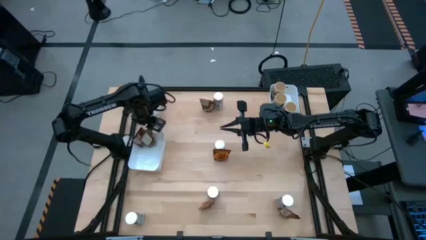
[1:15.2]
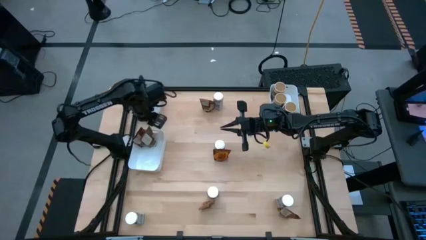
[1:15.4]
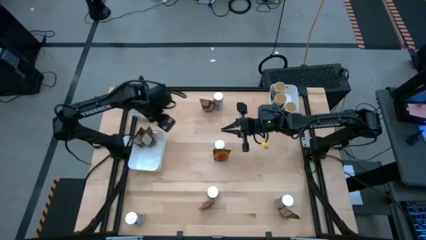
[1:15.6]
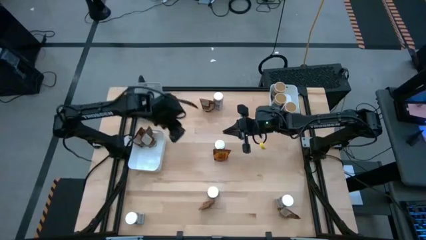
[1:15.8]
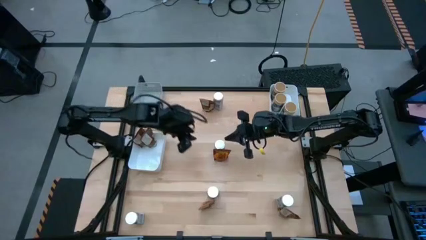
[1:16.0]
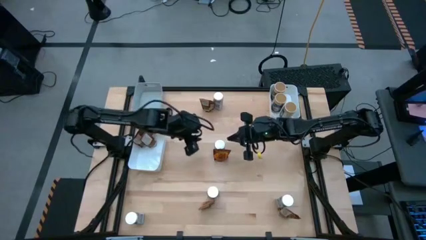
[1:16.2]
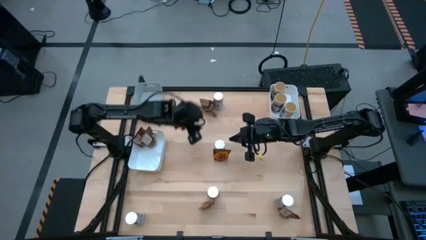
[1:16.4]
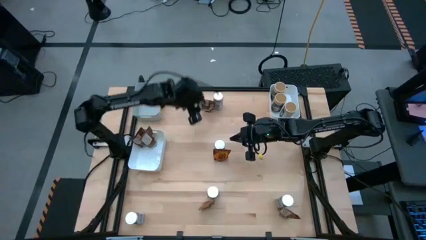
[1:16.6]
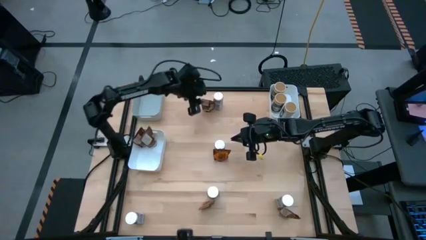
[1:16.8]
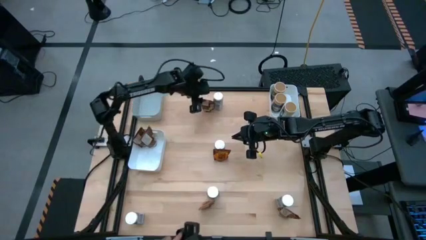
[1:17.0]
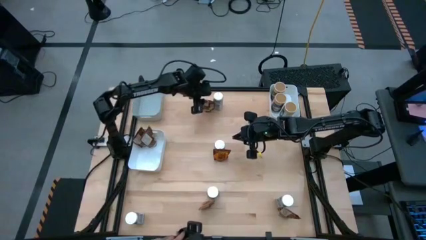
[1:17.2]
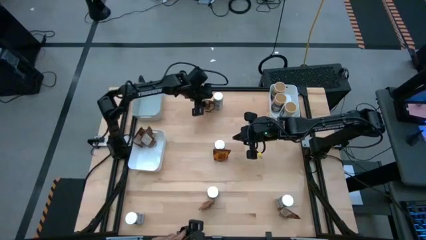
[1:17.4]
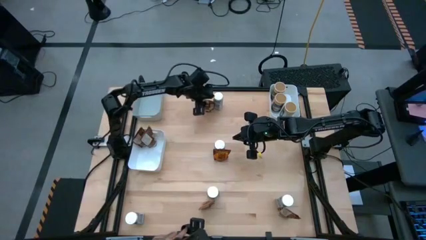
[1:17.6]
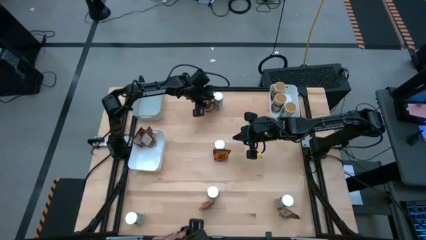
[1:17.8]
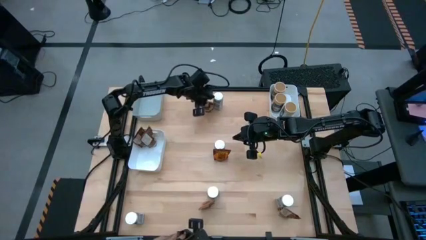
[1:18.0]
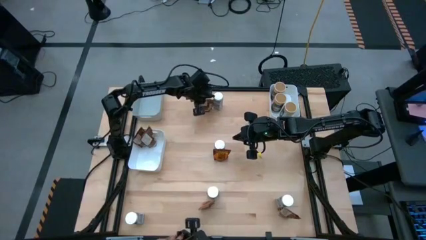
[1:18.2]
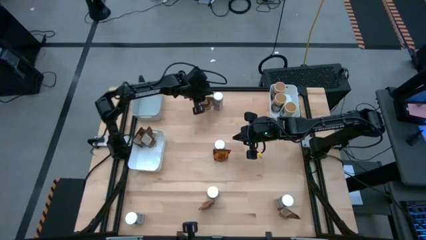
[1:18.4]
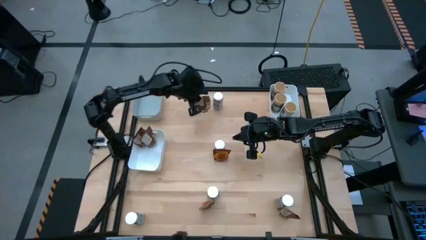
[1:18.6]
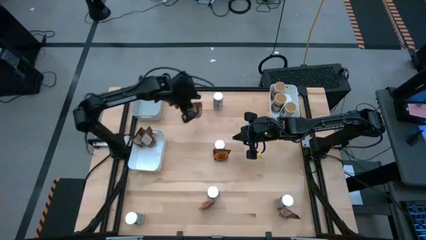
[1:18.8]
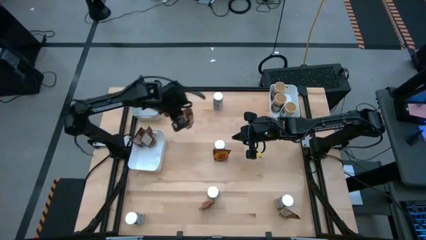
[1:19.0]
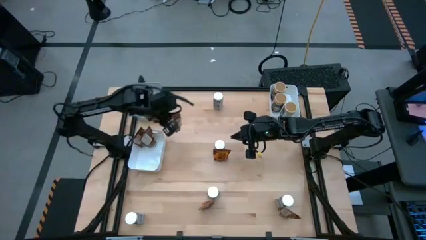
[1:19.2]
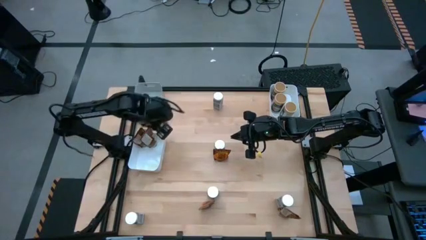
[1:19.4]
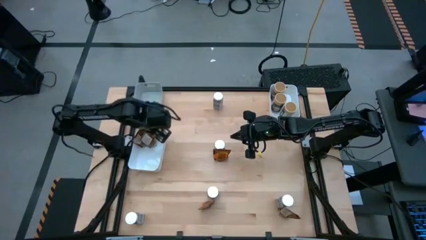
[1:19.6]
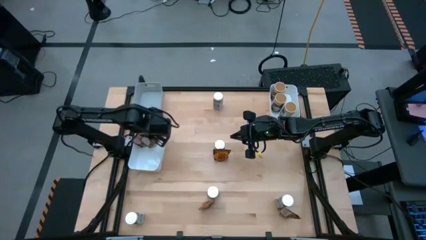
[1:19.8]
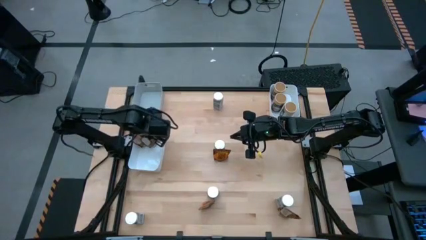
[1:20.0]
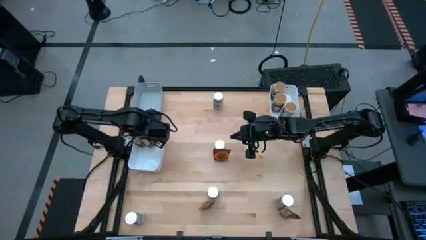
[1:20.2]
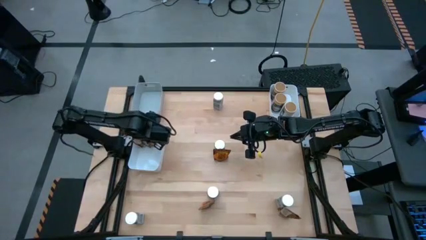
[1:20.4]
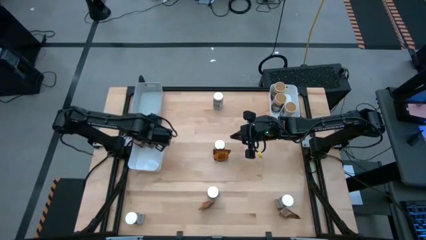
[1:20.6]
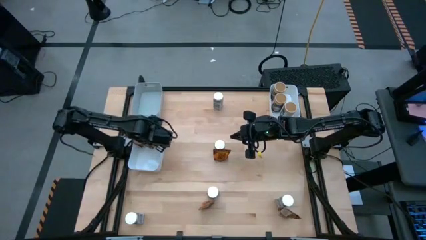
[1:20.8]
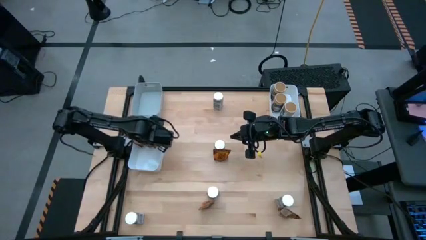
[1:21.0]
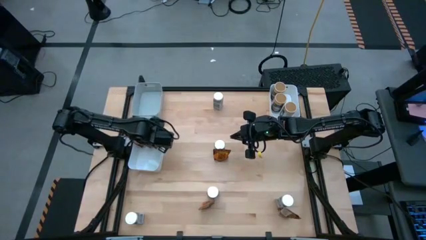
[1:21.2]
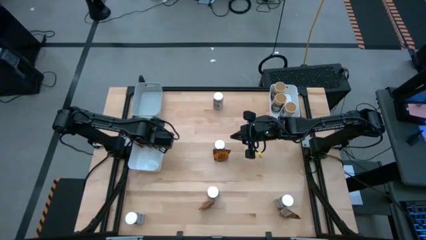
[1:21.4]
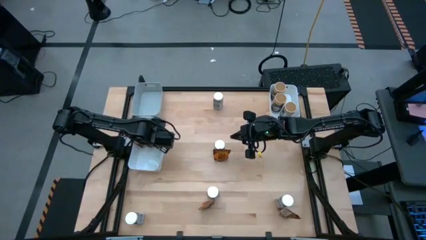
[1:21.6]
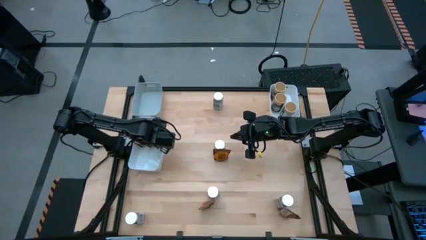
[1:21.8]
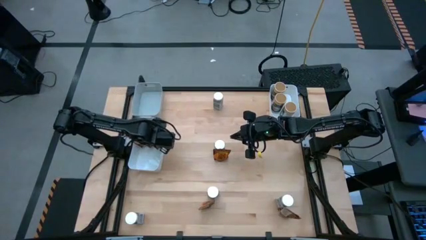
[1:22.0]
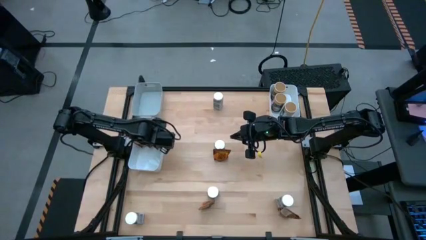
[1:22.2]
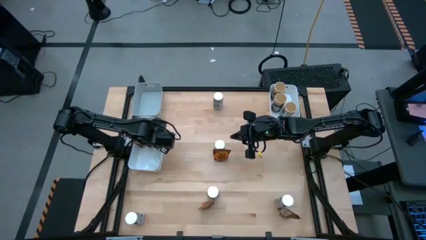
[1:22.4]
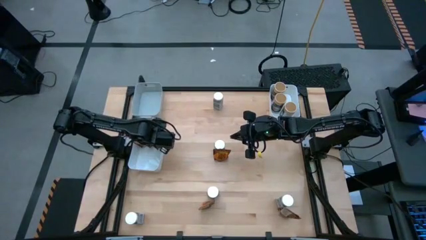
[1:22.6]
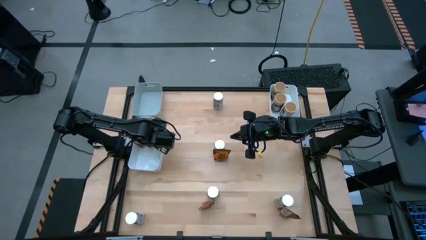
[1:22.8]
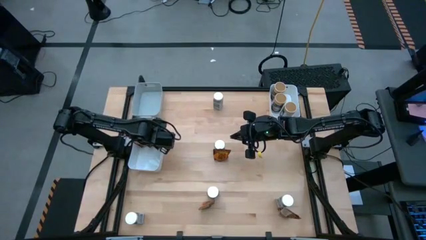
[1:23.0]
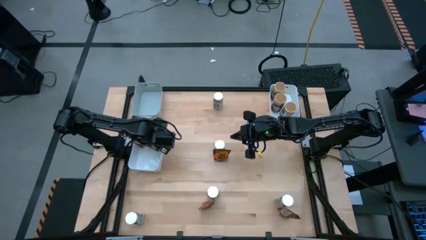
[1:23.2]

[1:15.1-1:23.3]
Task: Sort spices by type
Put the orange seasoning pack into the left white bin

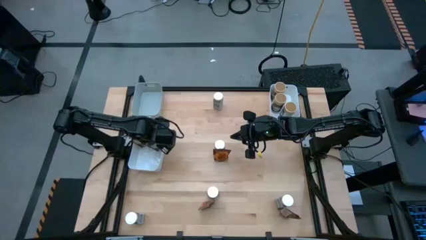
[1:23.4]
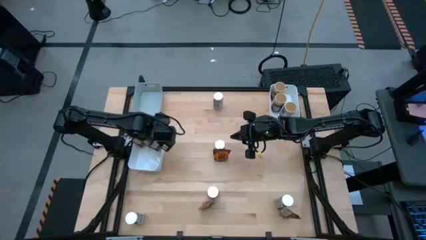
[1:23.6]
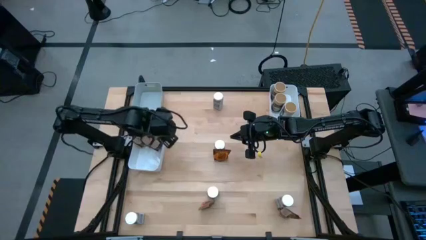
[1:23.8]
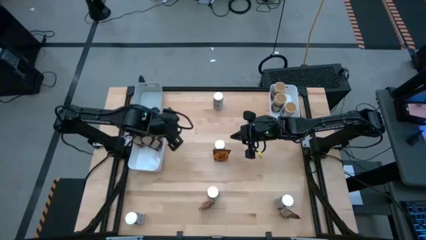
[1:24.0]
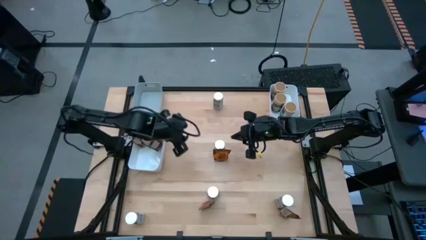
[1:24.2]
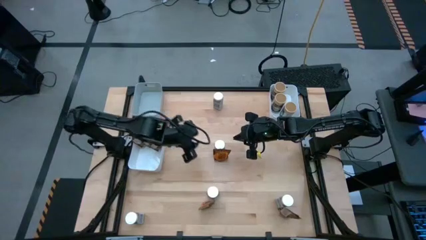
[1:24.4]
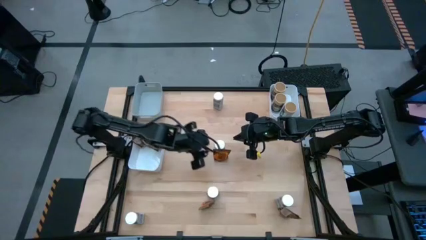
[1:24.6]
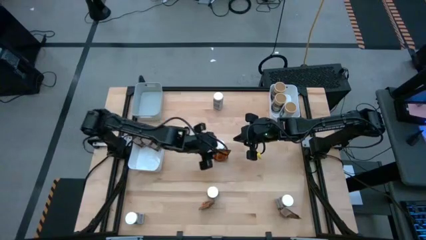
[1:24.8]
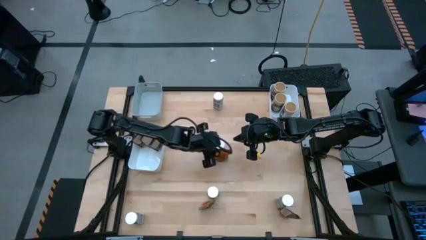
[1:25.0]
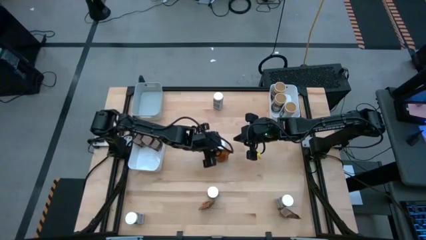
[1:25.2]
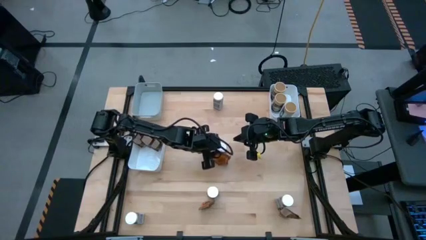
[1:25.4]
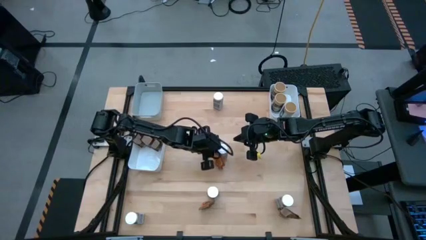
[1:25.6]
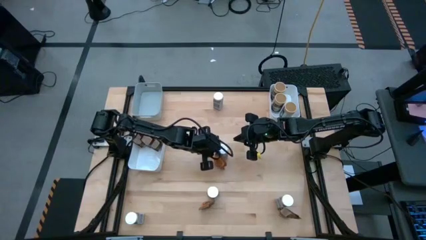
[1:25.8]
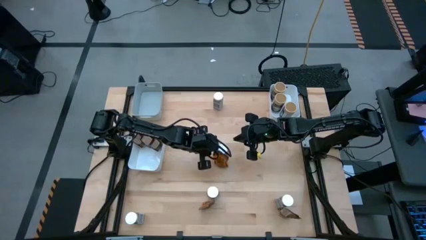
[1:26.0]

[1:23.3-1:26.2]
Put the orange seasoning pack into the left white bin
